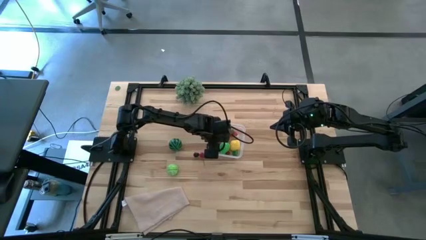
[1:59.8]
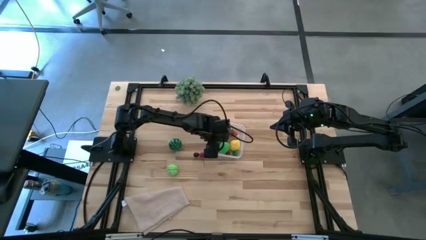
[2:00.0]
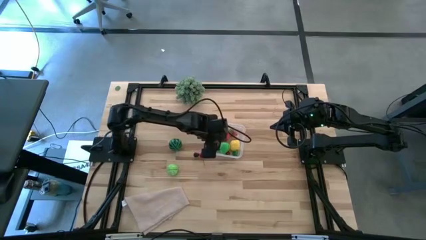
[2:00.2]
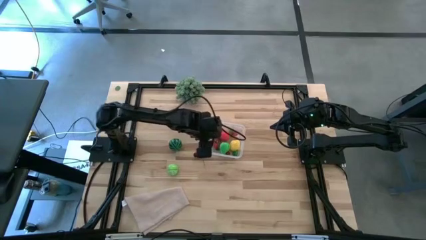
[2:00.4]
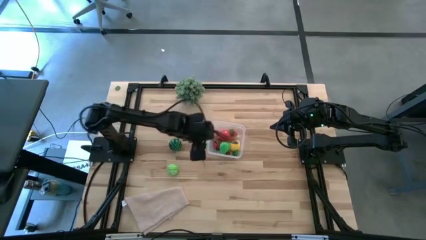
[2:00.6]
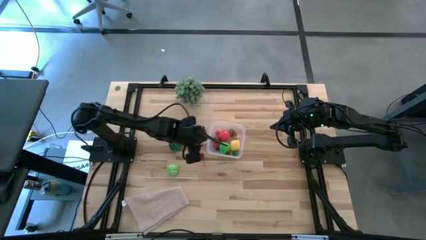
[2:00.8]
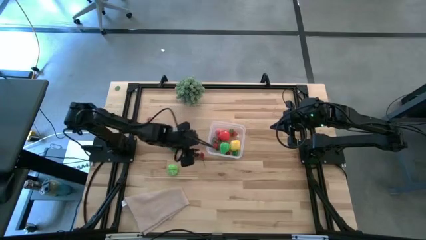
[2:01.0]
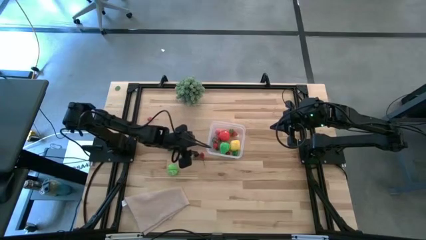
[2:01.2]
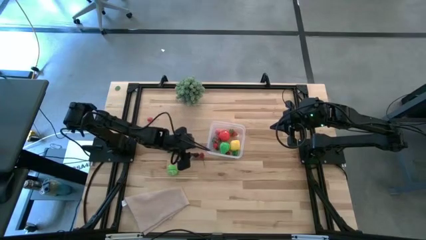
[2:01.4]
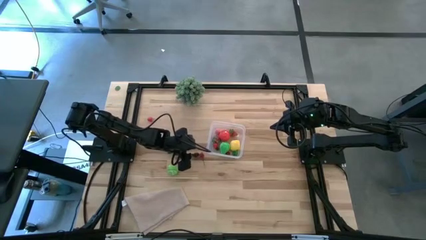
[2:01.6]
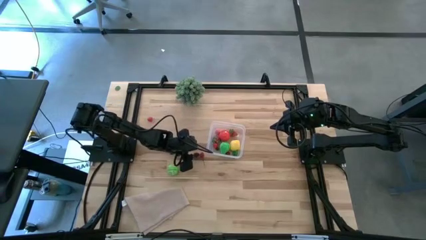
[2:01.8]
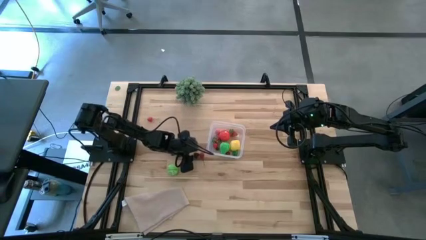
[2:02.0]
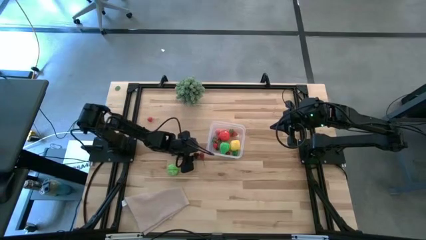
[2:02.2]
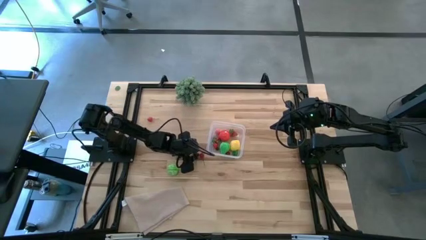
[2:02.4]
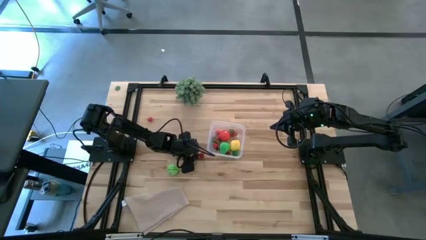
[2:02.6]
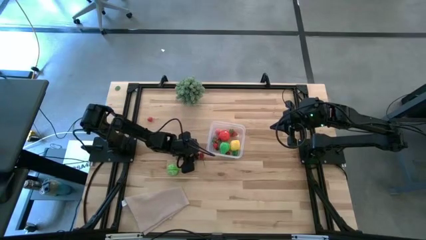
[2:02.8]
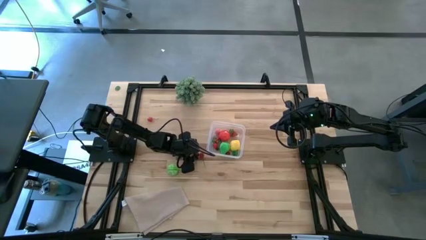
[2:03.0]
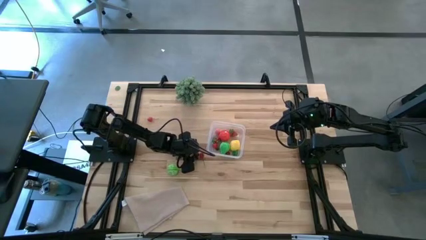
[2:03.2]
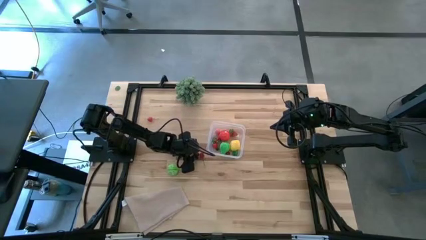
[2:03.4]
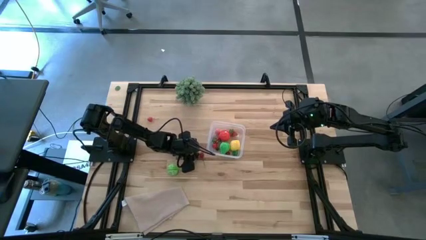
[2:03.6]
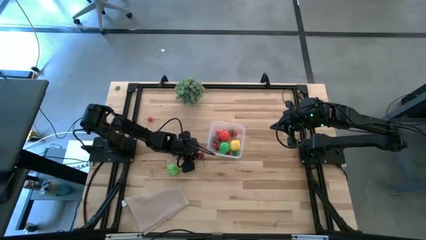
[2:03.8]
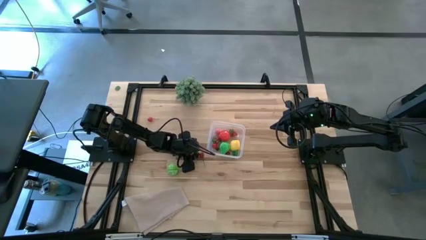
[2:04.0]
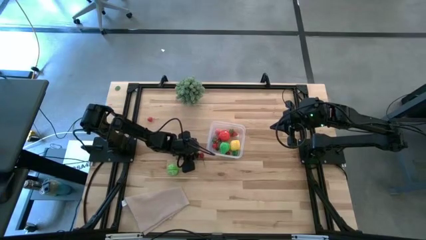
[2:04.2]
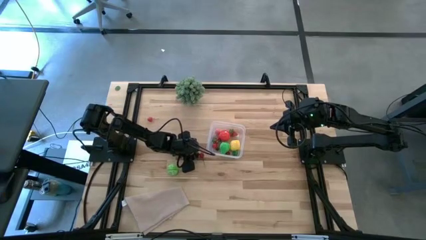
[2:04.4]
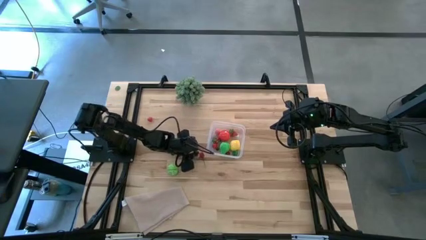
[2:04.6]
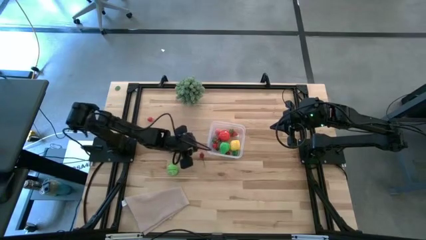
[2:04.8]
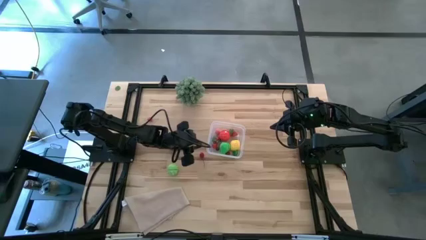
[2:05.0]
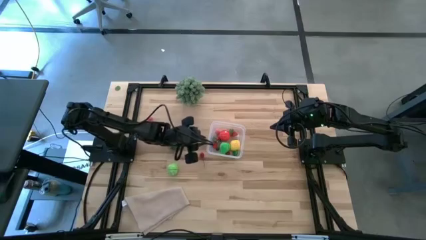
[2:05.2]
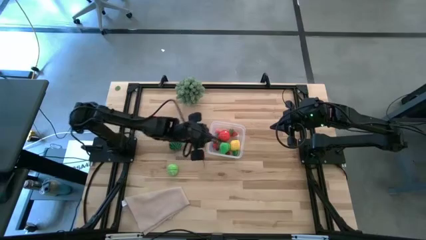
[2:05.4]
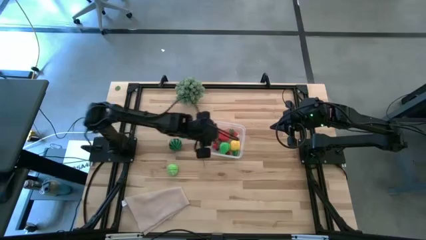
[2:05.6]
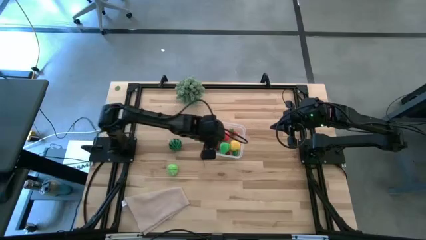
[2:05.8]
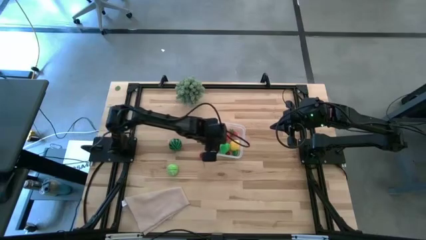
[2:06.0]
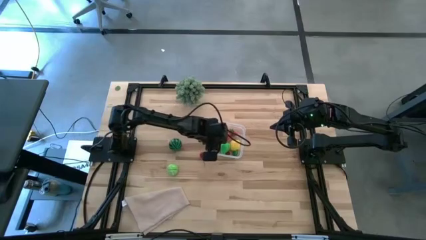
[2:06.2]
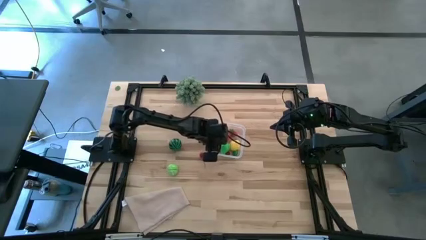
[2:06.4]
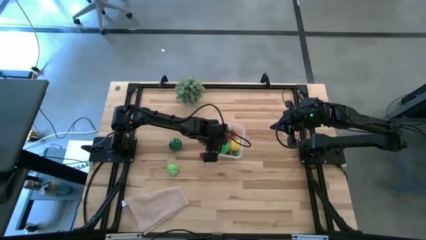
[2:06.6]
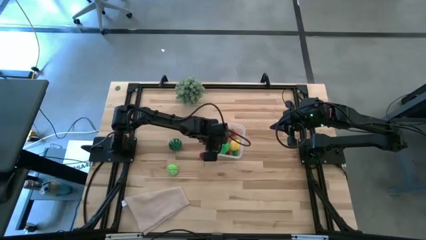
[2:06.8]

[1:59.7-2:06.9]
Task: Pick and placing Produce into tupperware
Put the blackberry into the transparent bin

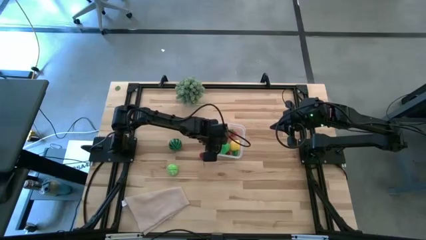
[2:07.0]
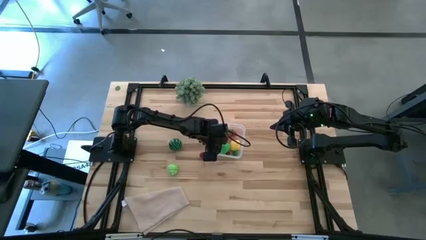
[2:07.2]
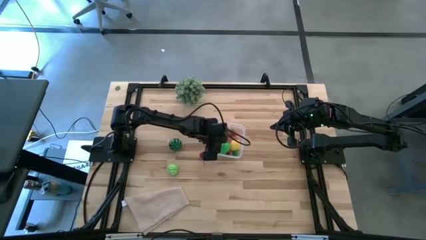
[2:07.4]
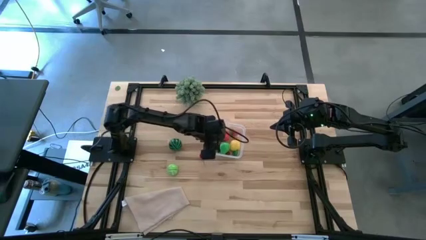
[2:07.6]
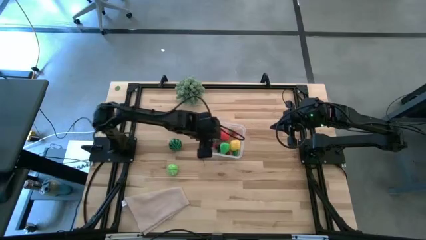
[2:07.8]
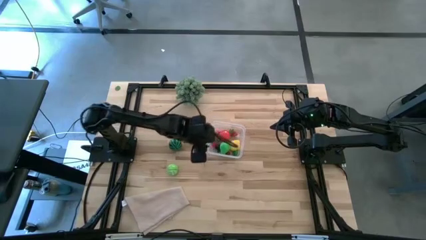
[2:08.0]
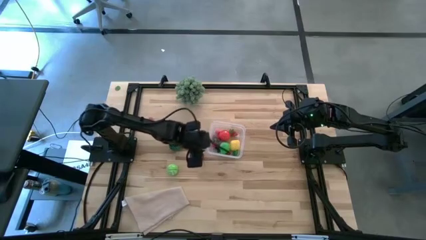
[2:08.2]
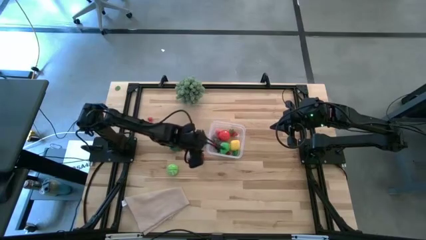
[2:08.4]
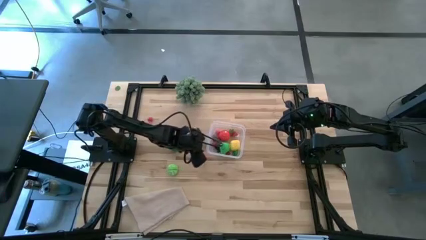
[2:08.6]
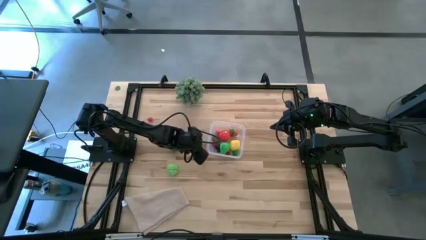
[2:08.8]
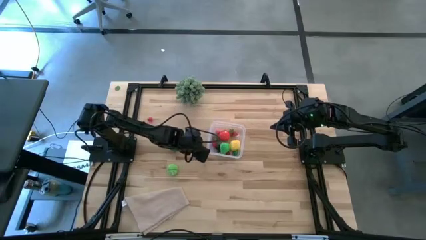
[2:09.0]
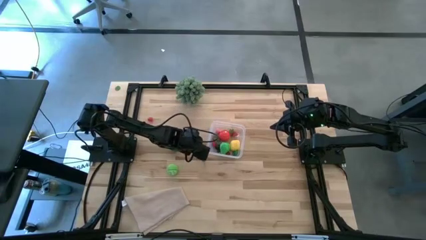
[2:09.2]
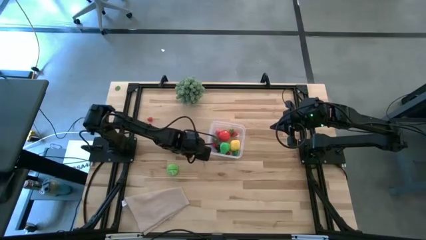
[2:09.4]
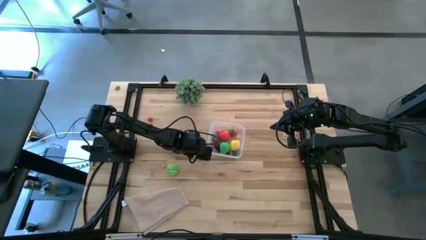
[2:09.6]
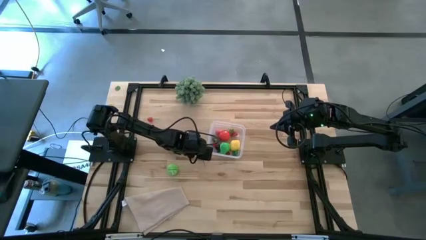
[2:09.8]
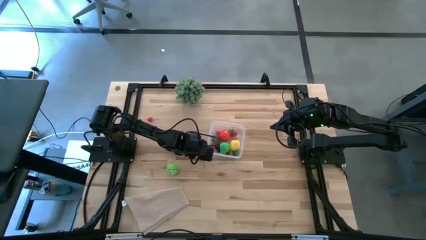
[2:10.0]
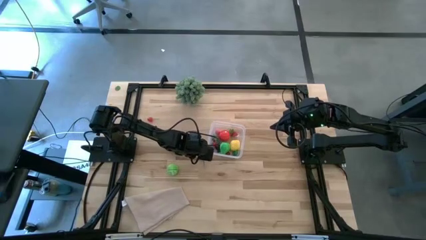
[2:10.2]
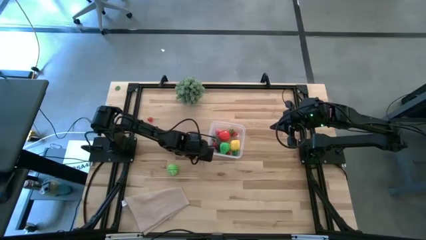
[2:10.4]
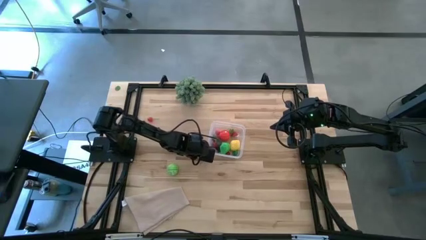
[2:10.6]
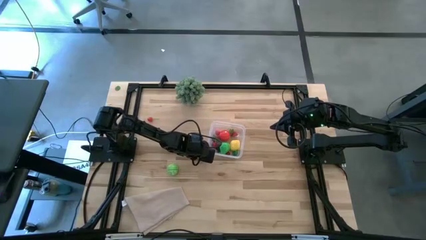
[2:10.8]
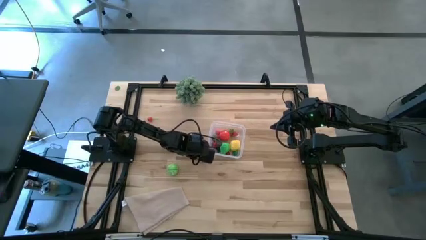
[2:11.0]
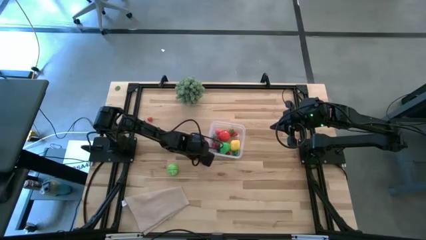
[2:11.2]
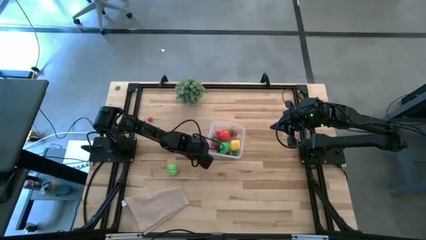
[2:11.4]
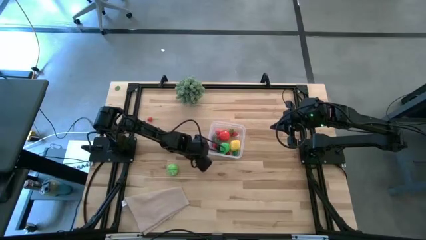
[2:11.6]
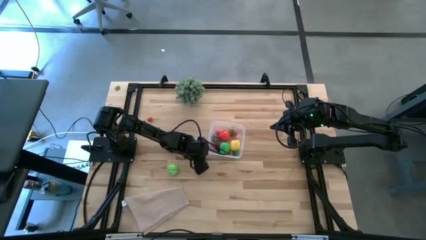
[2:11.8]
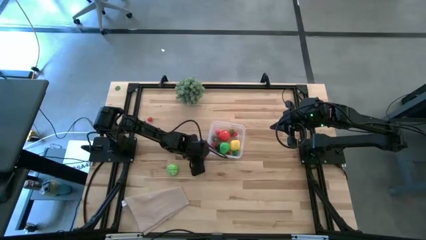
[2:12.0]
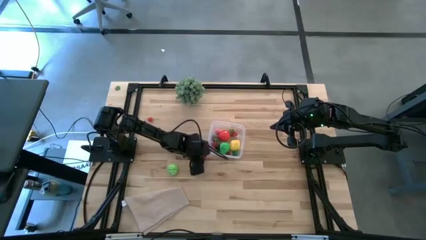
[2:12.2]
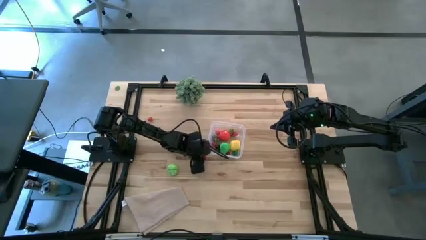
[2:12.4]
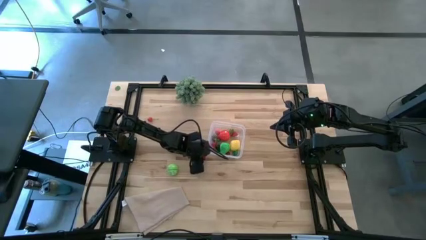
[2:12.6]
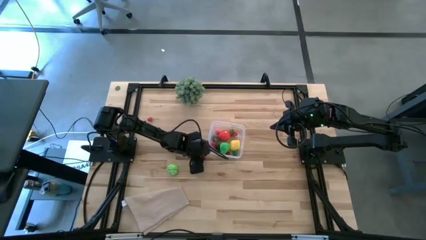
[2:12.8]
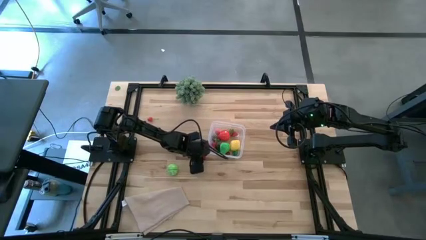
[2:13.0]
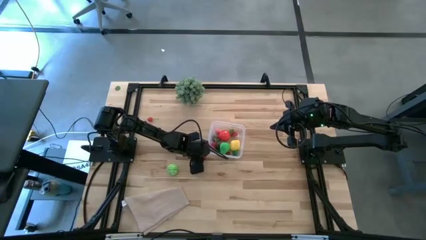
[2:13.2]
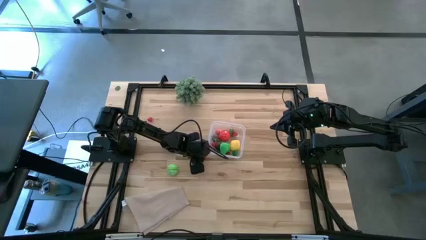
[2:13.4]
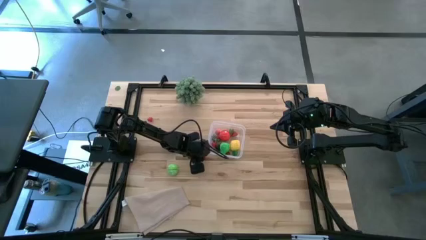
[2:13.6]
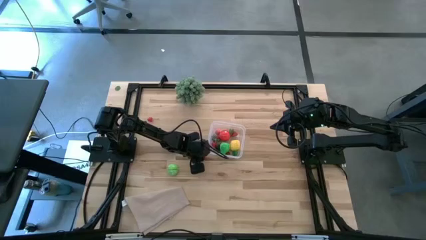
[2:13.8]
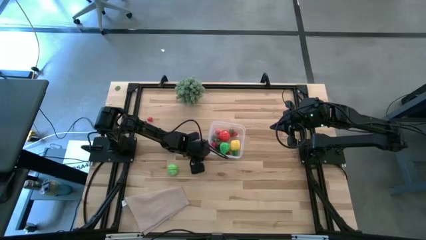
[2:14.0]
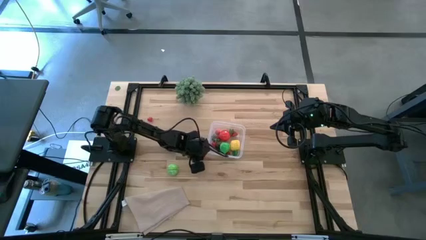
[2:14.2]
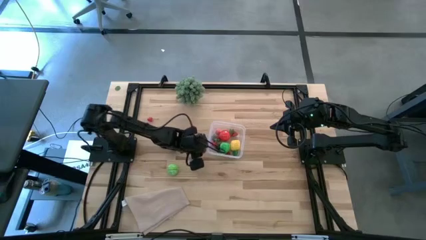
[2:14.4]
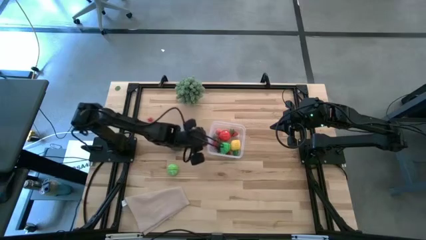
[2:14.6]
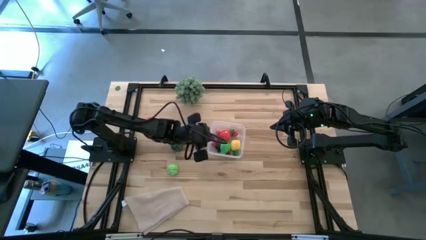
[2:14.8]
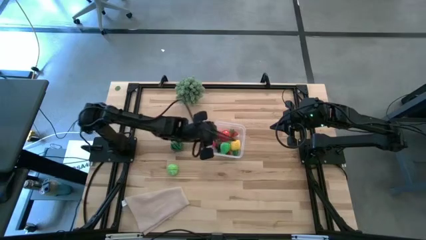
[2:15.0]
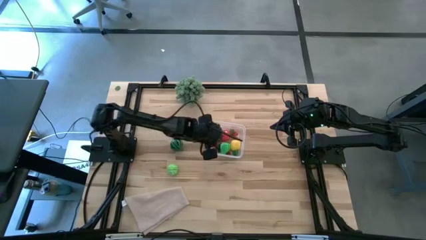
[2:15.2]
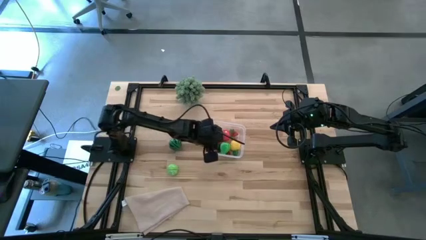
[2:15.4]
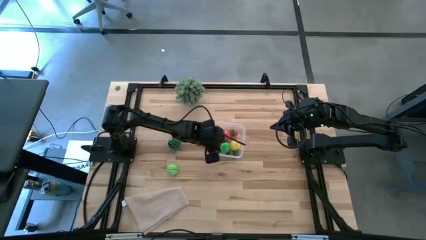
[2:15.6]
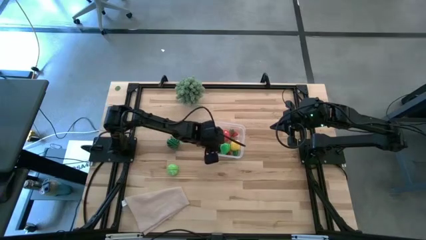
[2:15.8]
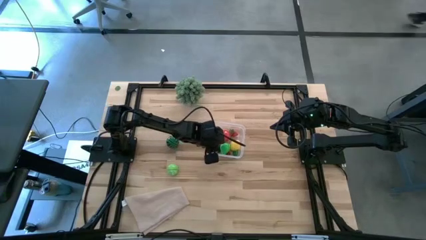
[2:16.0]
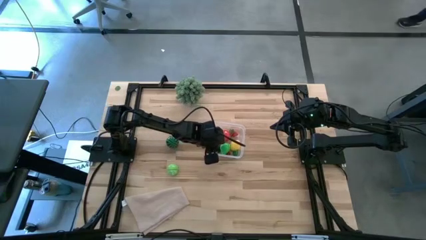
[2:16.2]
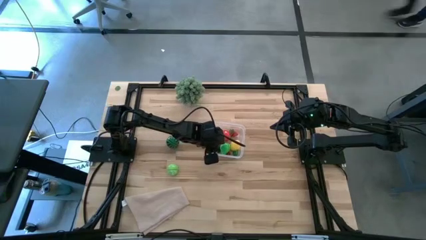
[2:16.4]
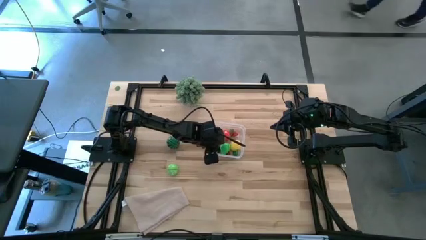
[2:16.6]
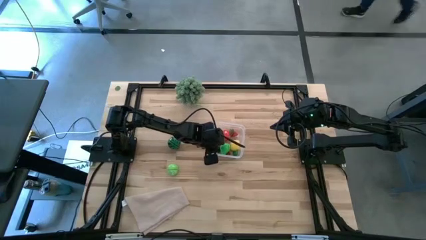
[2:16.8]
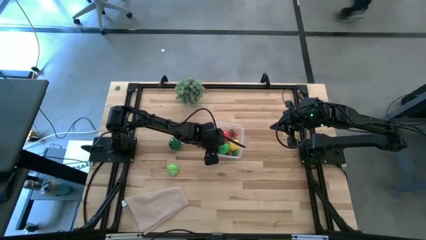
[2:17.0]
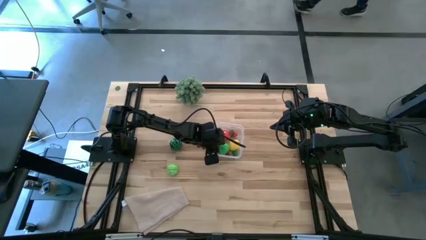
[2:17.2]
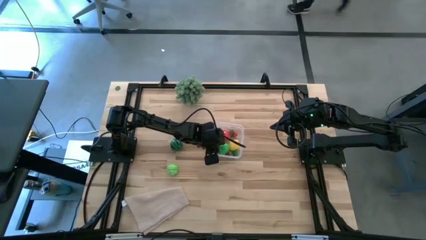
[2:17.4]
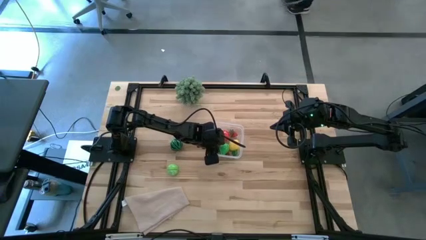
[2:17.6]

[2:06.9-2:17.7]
Put the bottom red cherry into the transparent bin
